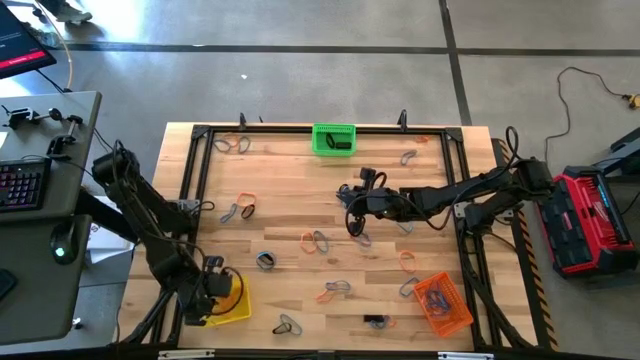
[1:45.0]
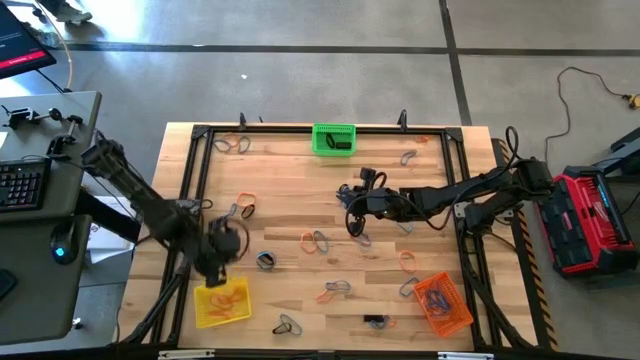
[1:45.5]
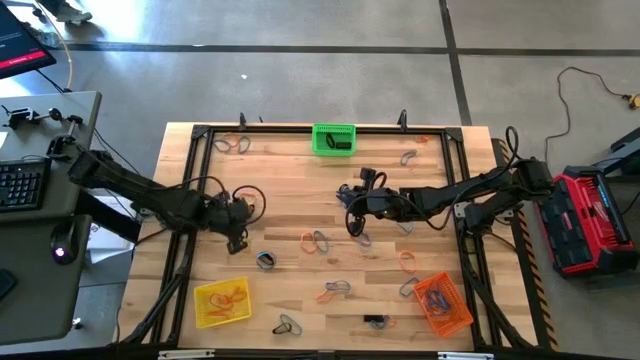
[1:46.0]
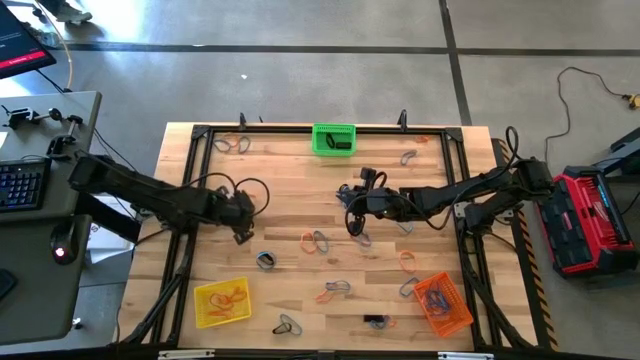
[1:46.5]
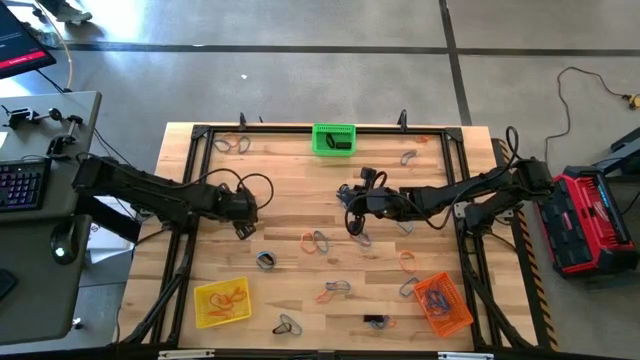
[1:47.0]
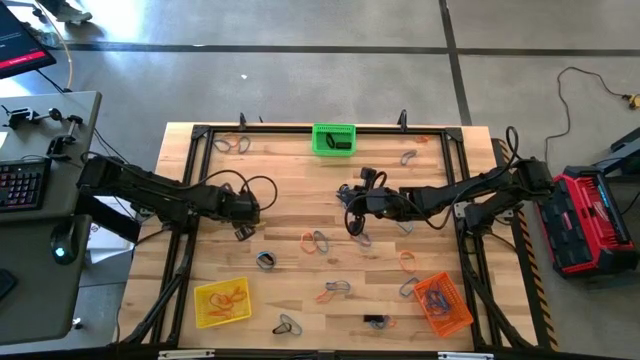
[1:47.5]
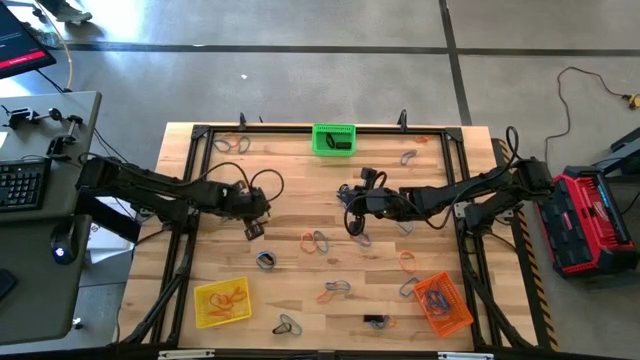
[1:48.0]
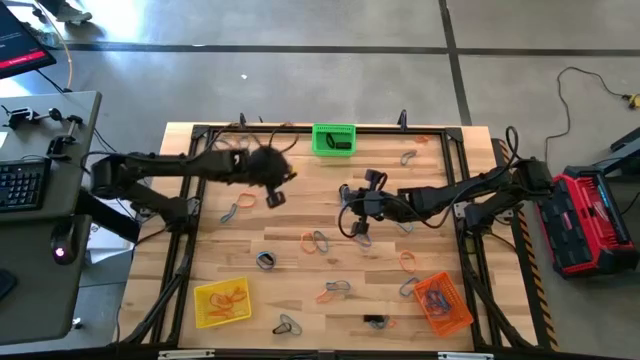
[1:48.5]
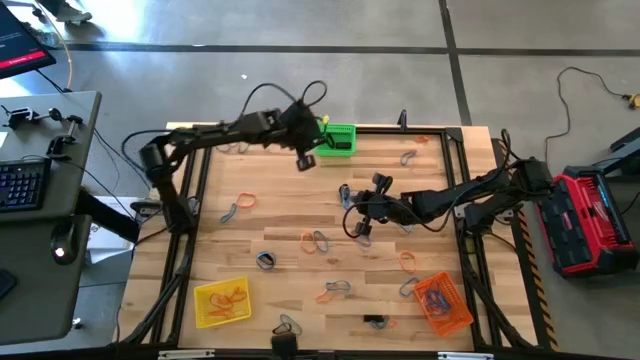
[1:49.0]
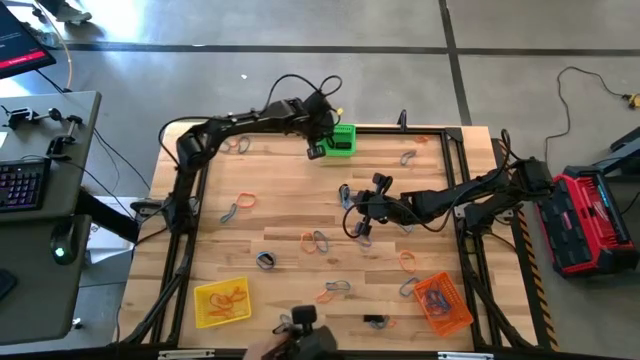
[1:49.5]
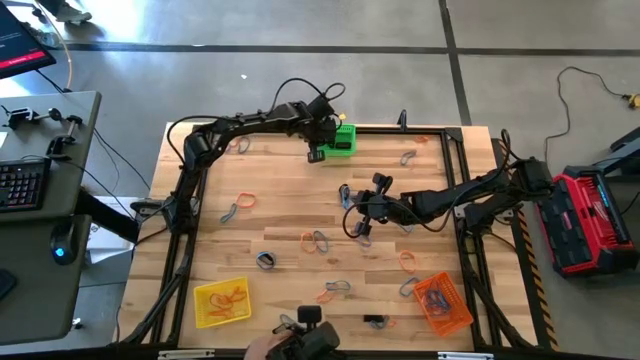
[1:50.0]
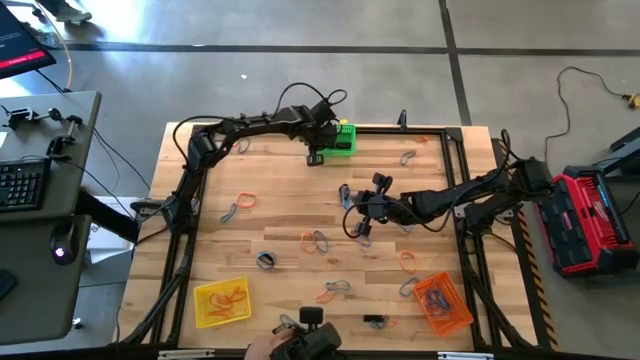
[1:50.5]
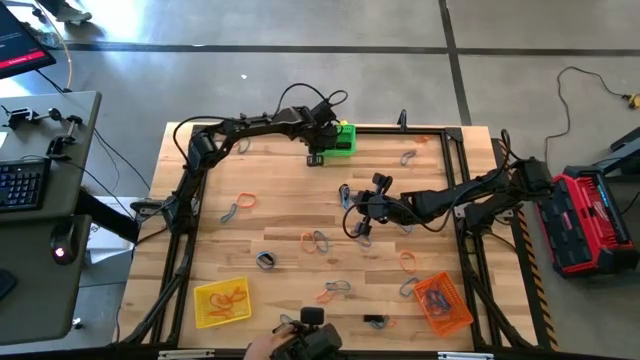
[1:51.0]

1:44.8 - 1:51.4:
Task: Sort rubber bands into baskets
Put the black rubber band into the green bin

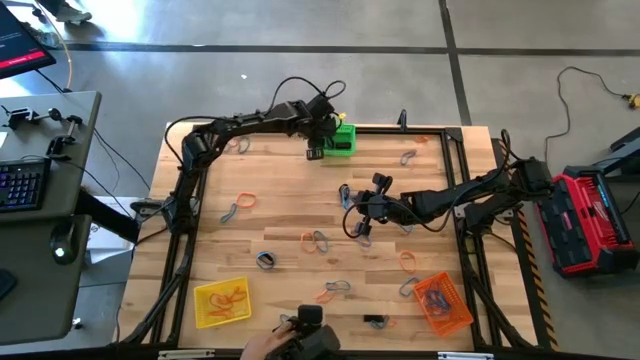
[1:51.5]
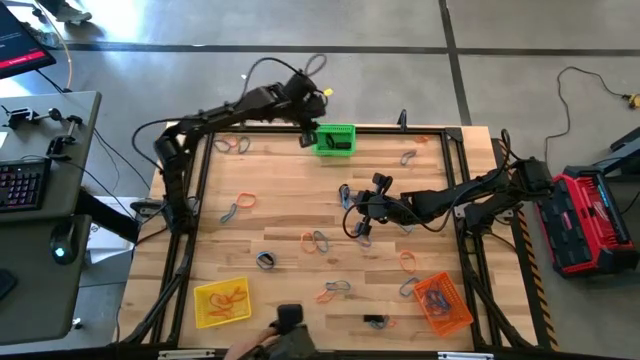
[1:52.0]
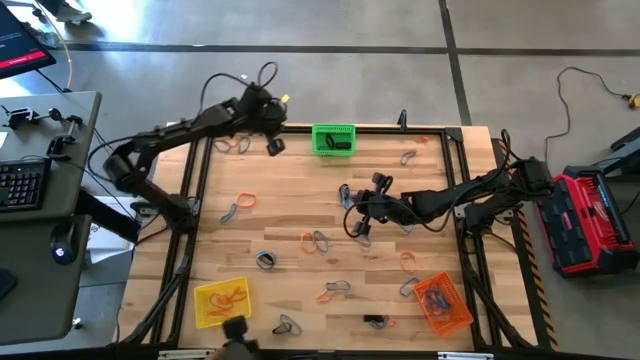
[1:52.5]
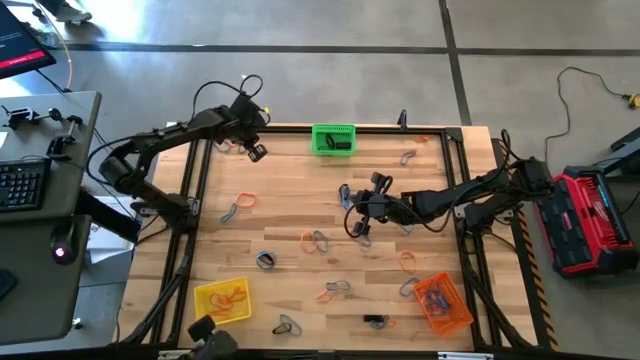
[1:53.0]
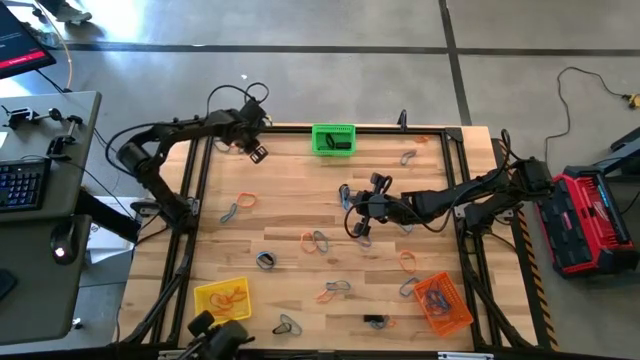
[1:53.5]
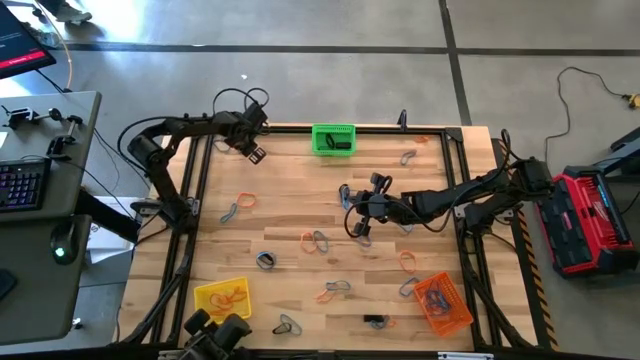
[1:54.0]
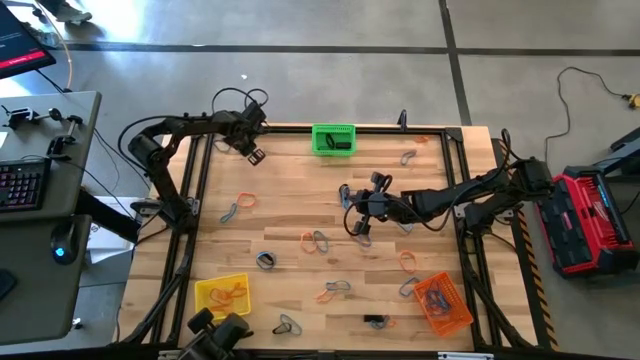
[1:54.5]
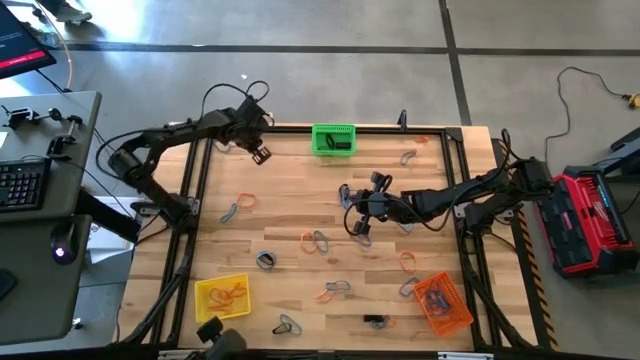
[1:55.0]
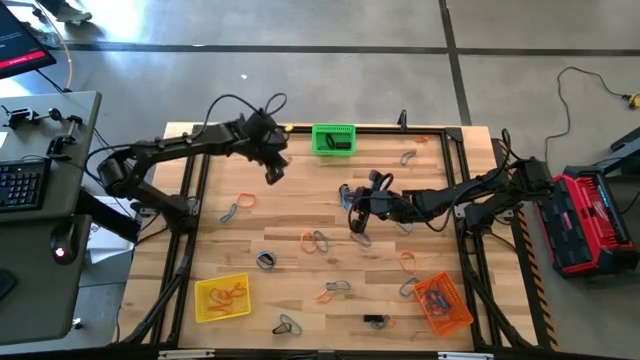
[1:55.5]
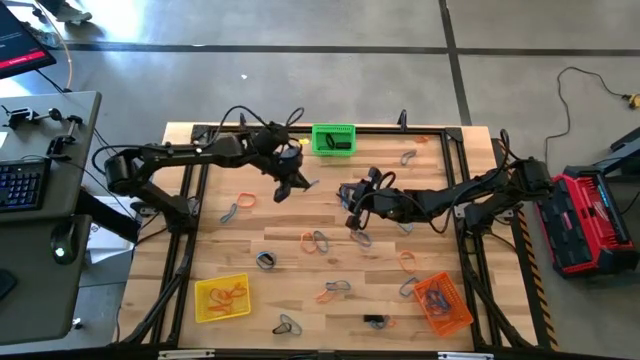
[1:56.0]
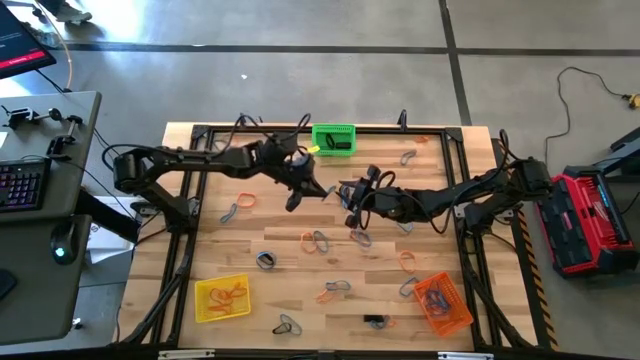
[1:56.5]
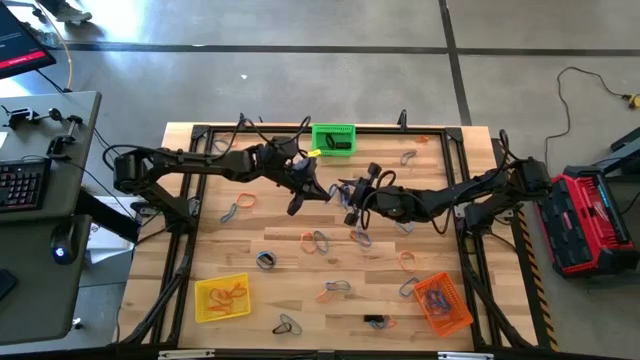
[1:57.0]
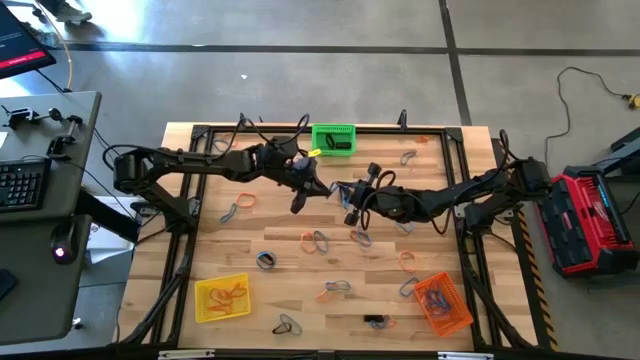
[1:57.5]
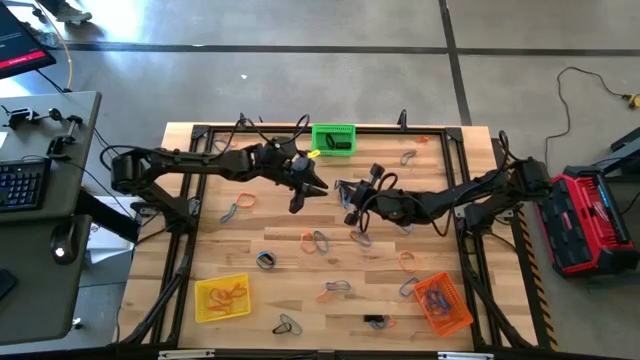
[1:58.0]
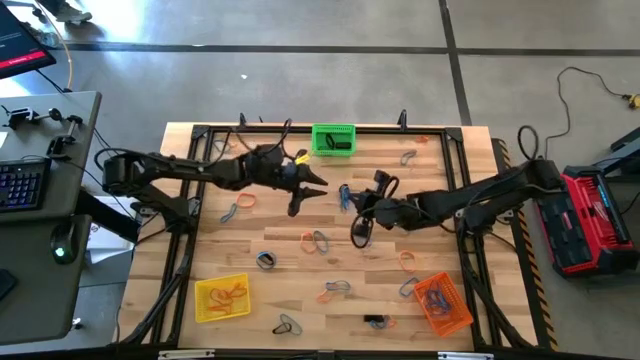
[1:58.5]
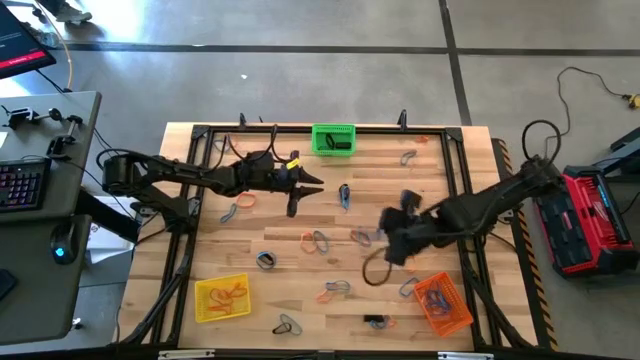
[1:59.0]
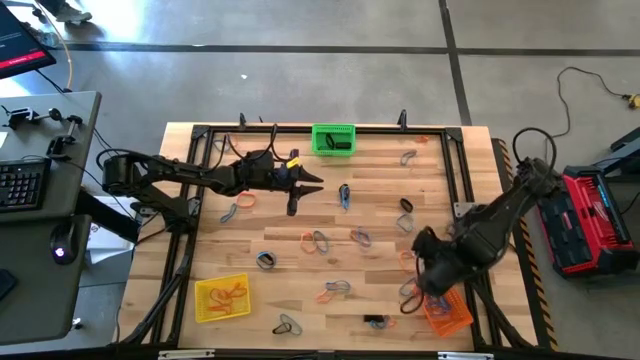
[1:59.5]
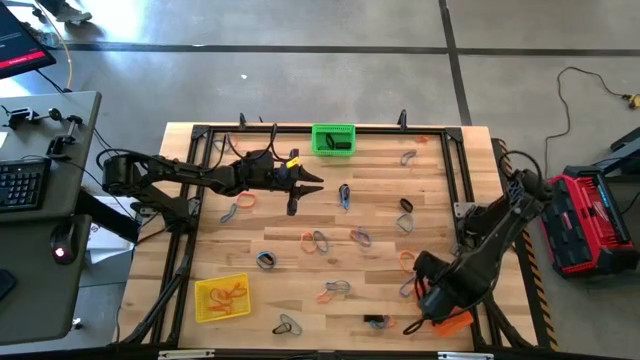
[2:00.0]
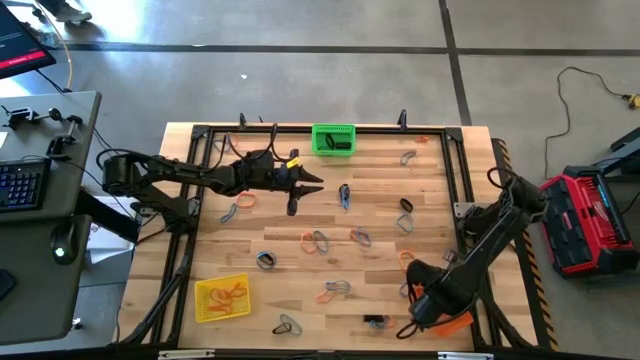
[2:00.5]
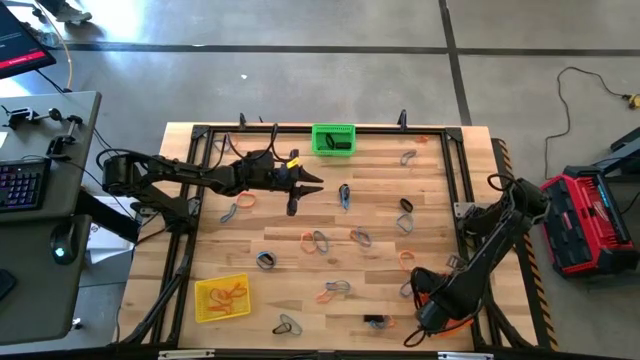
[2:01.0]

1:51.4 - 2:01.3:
Put the blue rubber band into the orange bin

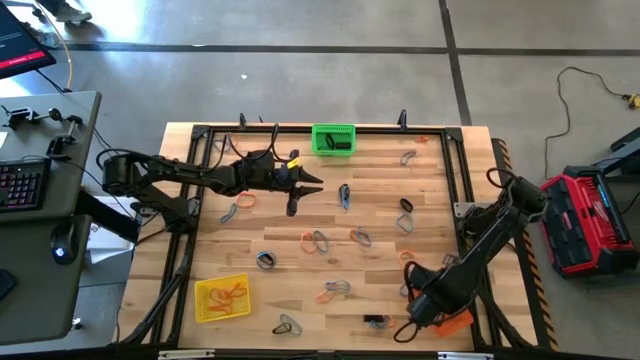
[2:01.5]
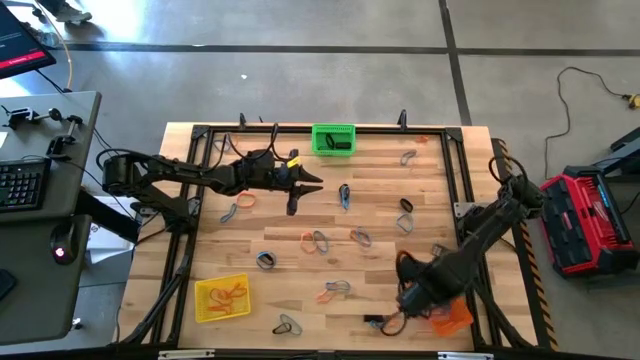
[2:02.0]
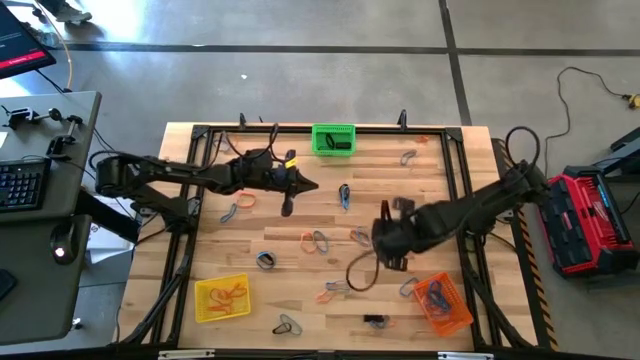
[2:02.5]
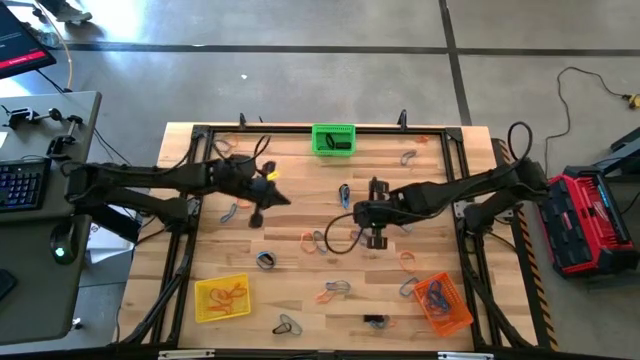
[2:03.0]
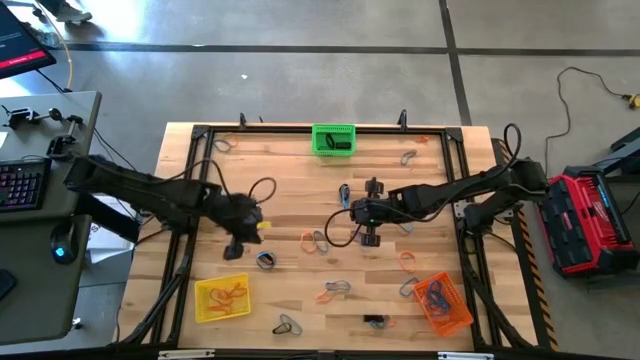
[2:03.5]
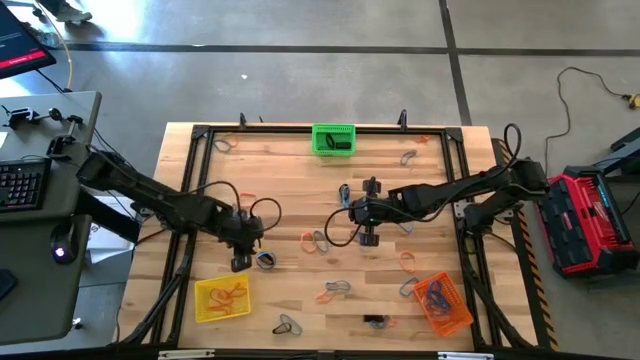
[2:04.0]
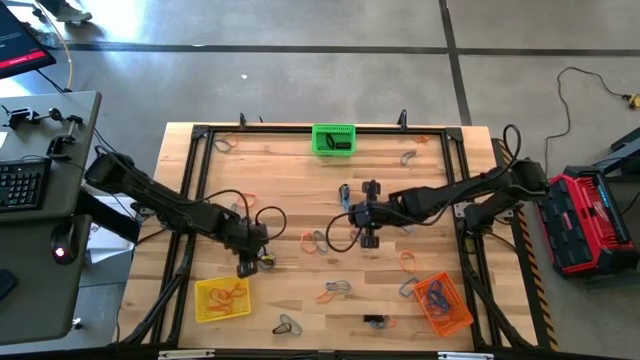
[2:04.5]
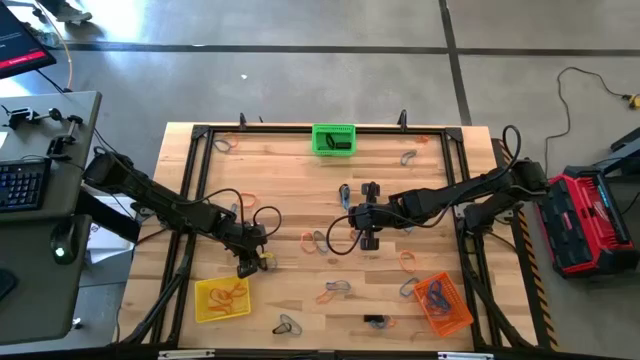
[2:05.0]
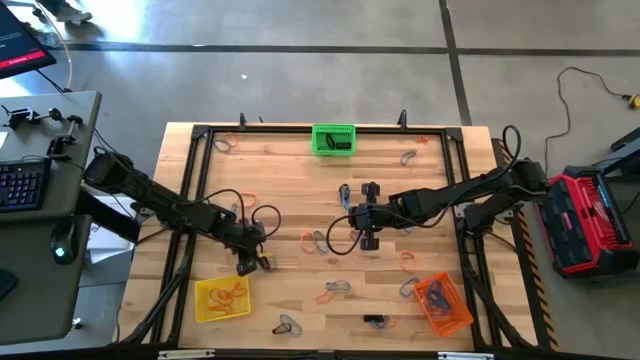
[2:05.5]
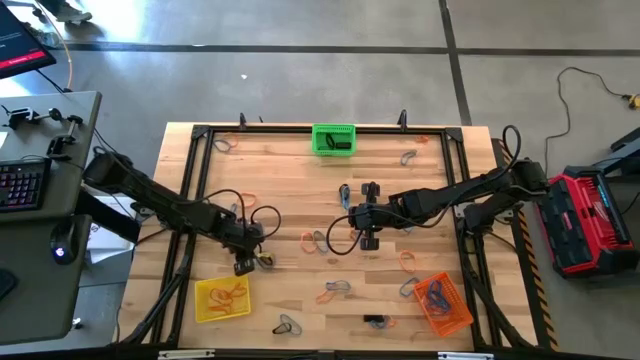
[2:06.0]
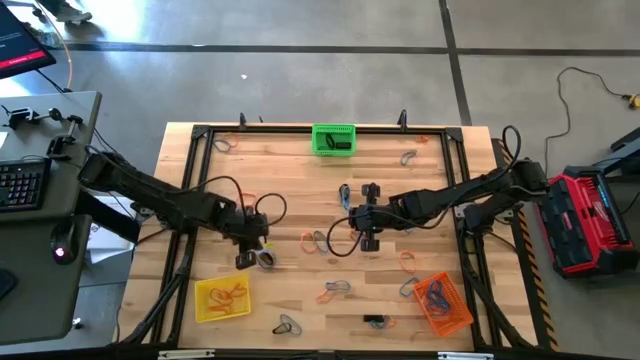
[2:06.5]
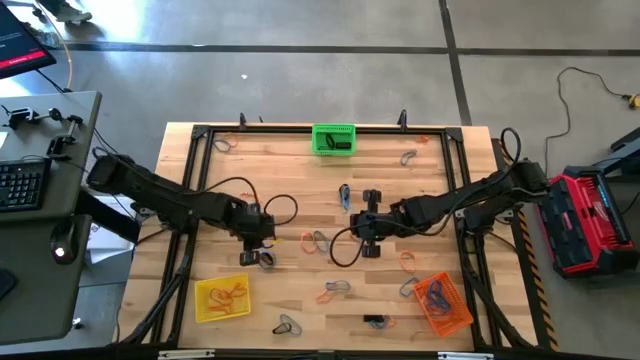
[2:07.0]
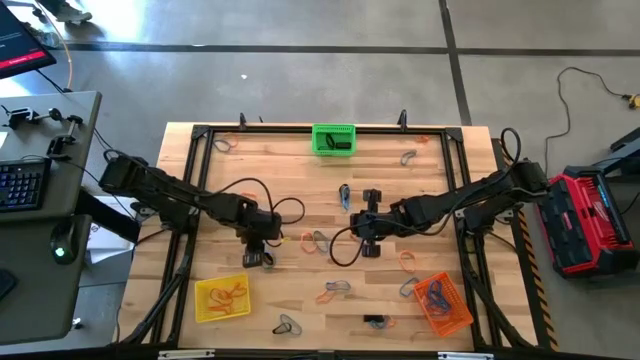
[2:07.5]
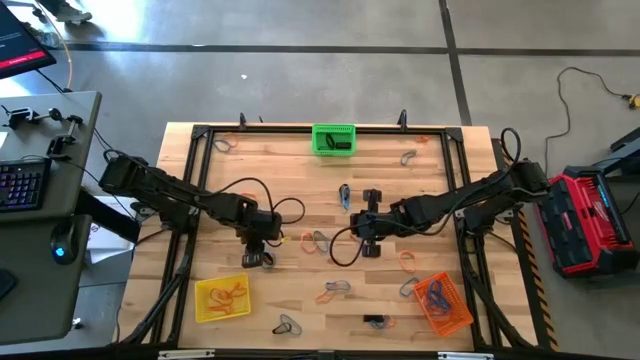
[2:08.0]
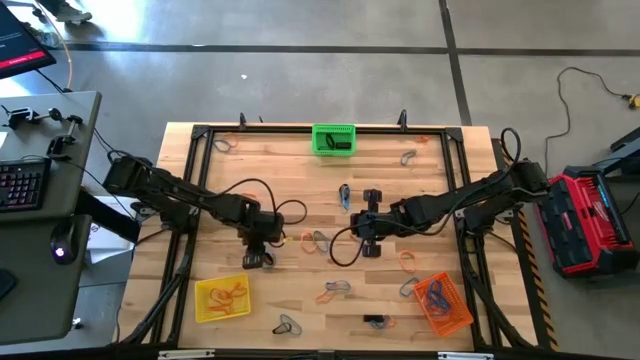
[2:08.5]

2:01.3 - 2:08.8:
Put the blue rubber band in the orange bin
